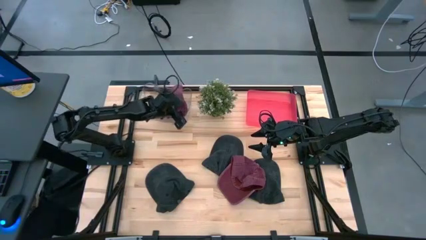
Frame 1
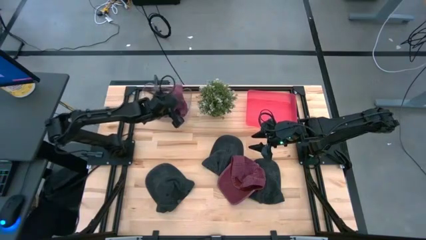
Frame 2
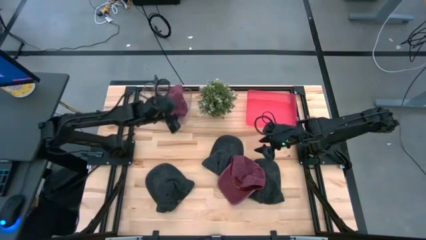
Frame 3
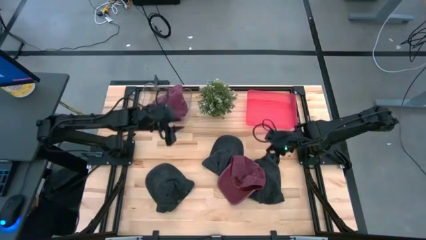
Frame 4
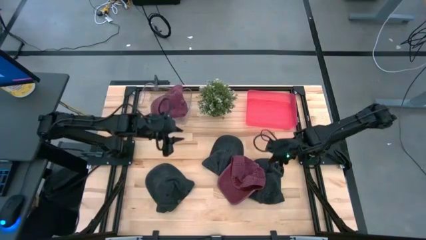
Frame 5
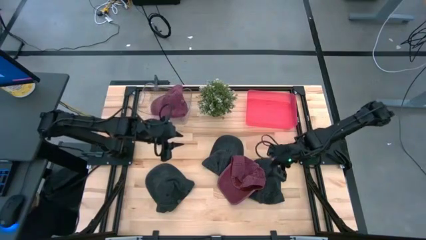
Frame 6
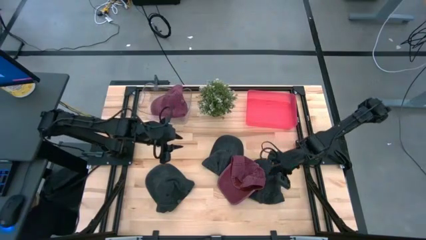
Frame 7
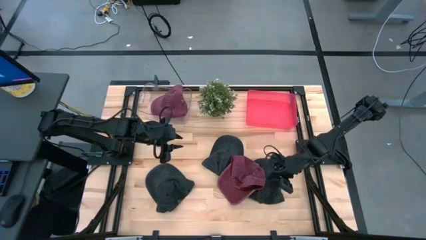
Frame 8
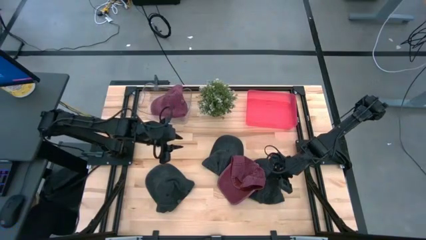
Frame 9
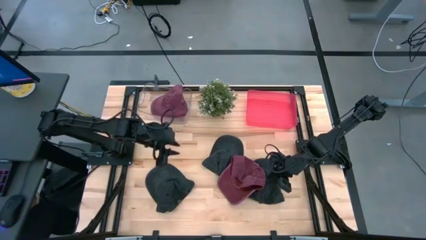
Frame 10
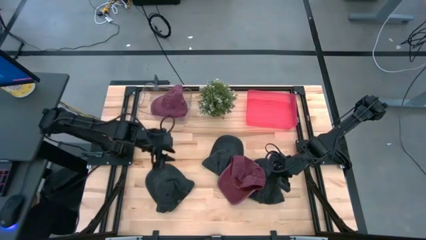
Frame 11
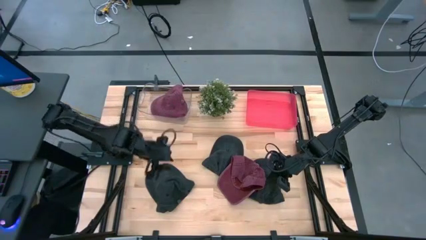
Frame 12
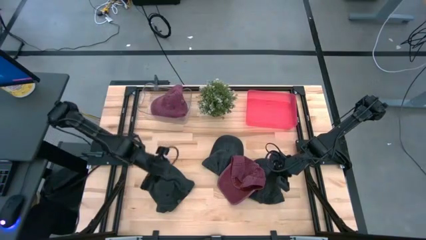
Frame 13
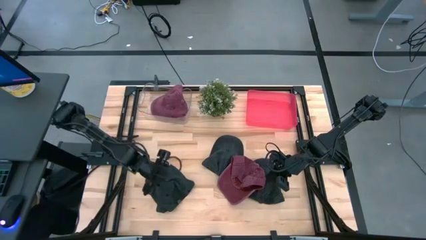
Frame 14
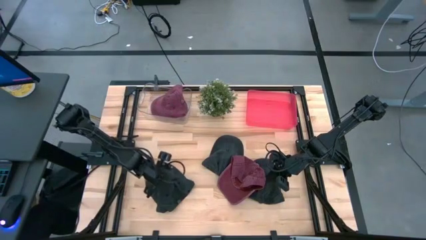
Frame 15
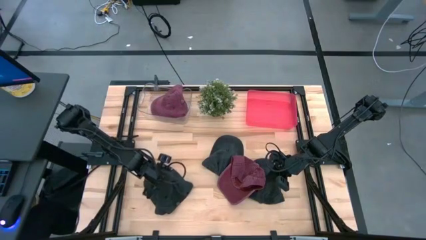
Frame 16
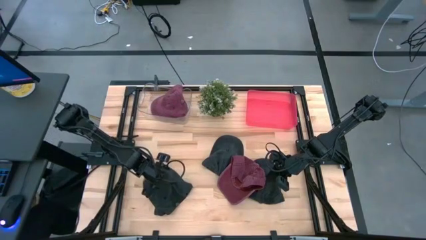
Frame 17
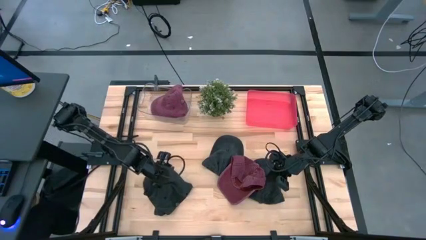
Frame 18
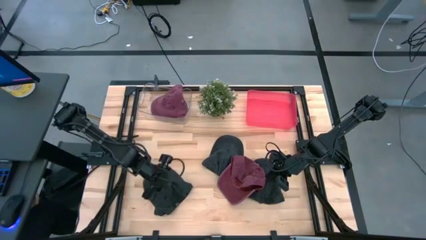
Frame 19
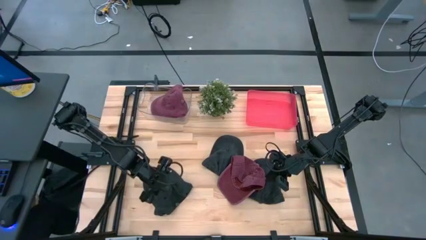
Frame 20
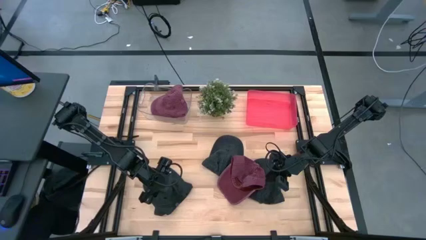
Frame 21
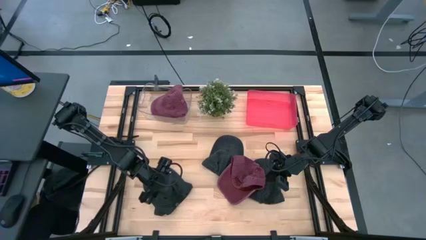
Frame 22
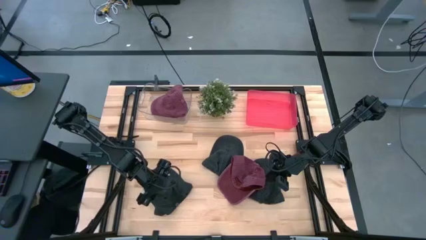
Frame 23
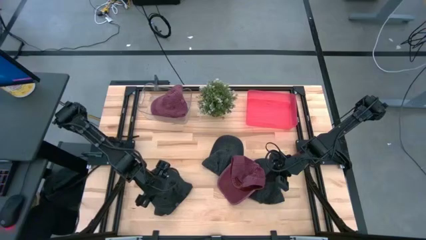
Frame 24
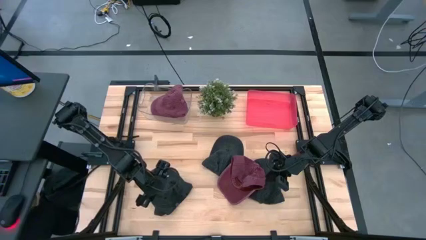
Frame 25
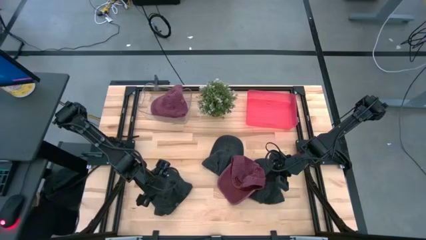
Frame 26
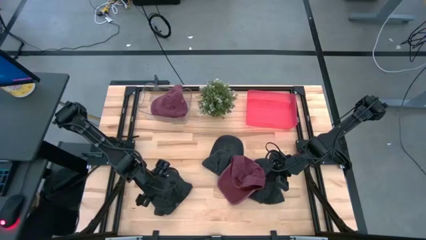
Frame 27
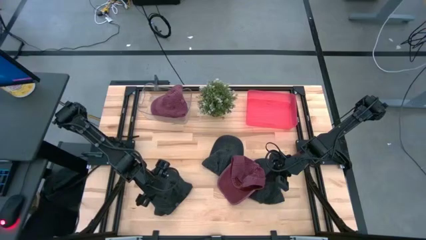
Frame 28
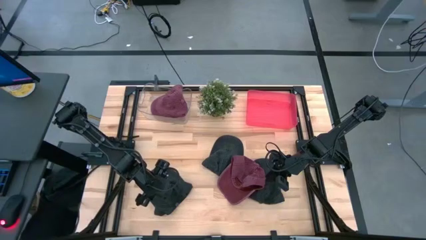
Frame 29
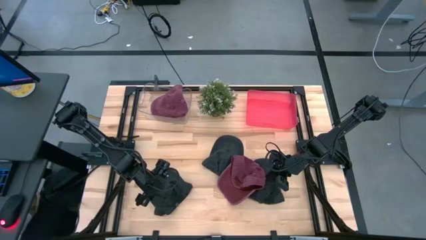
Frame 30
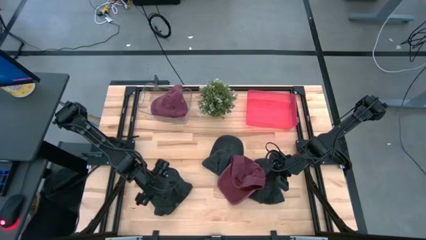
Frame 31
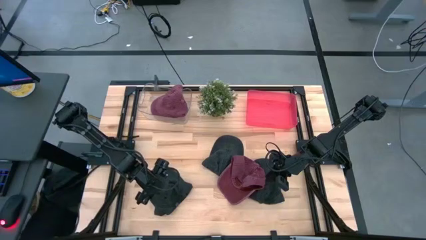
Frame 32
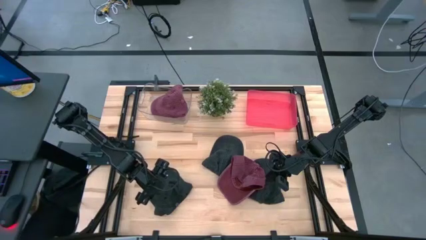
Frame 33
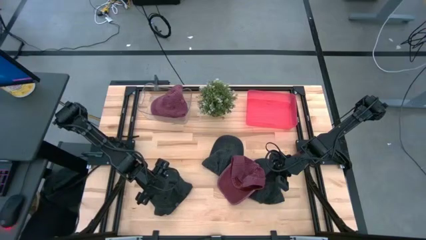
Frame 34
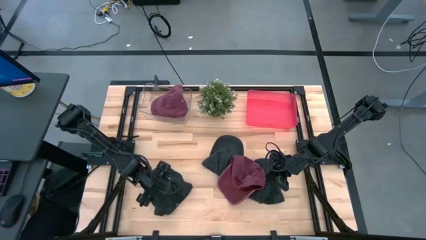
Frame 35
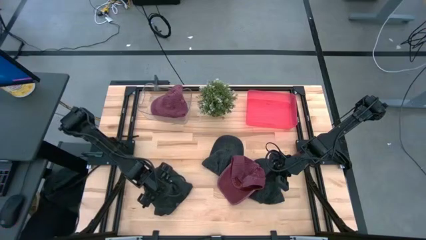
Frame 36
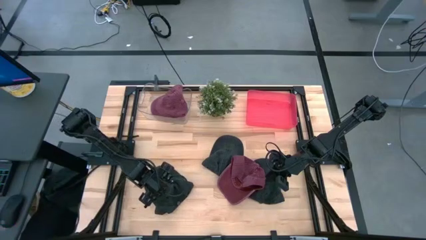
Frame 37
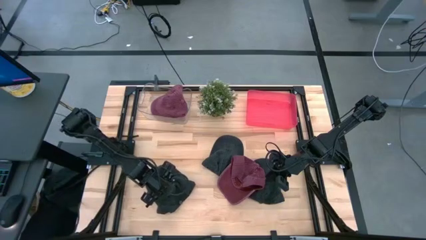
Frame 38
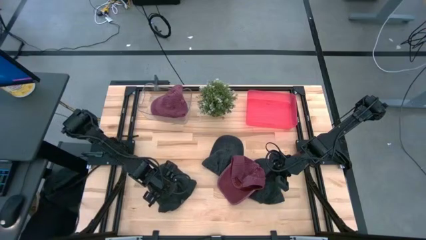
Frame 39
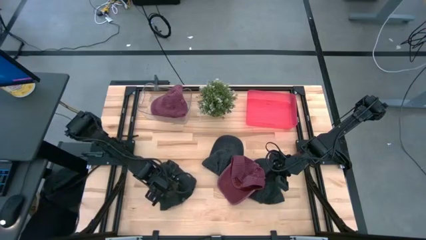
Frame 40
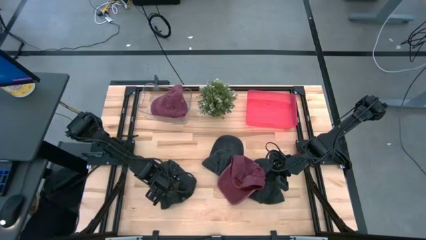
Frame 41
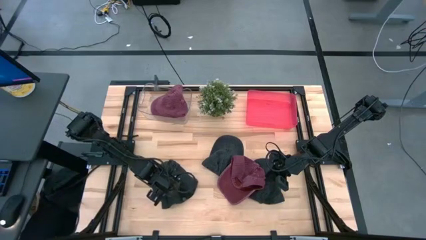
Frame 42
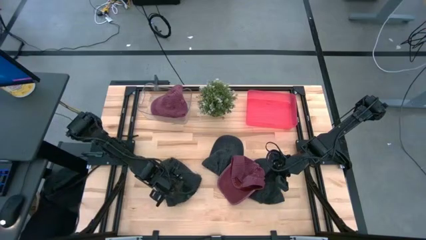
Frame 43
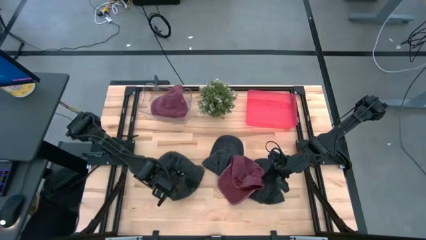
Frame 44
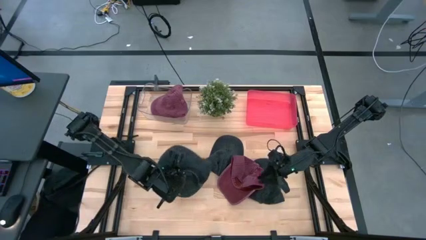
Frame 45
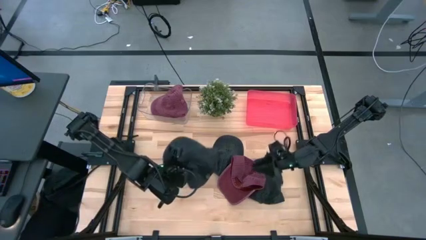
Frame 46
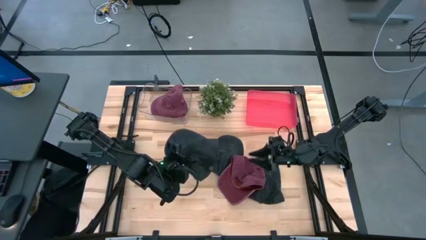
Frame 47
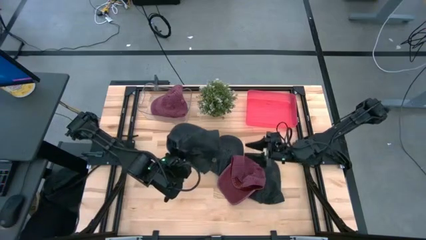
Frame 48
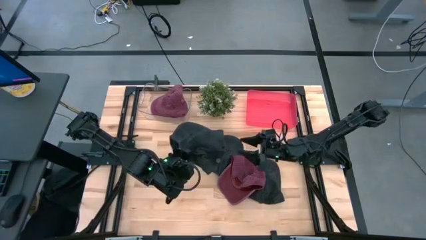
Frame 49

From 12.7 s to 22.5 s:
Task: Pick & Place hat
Put the left black cap into the pink bin

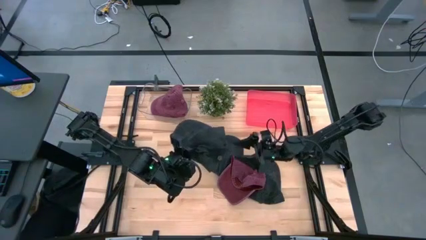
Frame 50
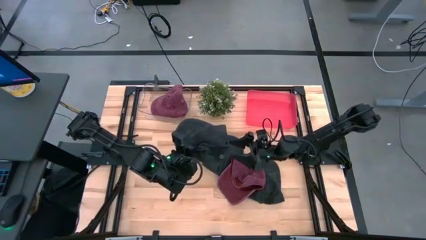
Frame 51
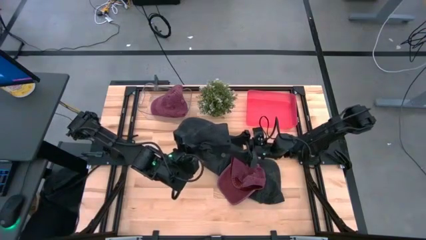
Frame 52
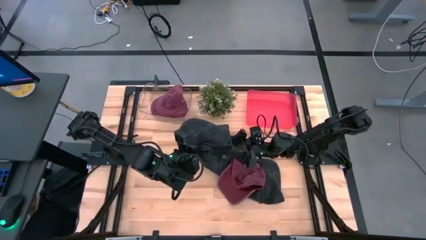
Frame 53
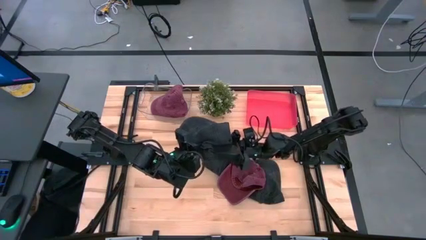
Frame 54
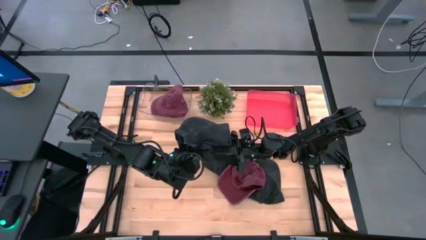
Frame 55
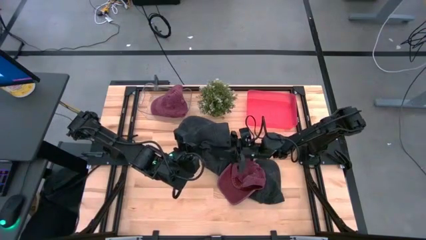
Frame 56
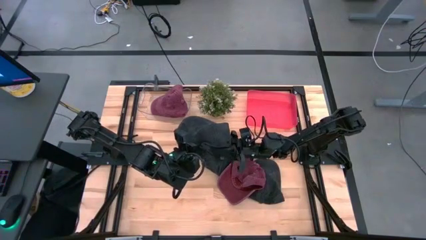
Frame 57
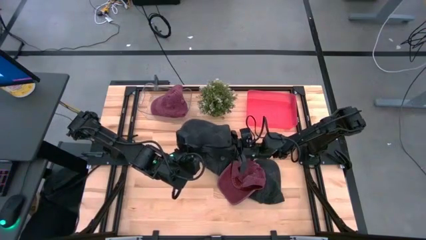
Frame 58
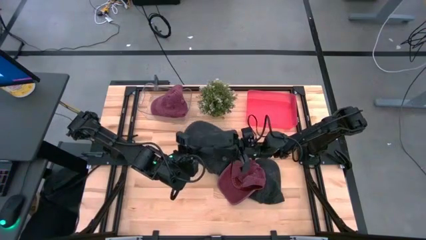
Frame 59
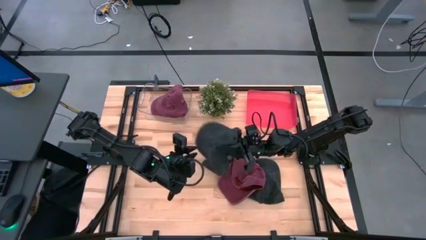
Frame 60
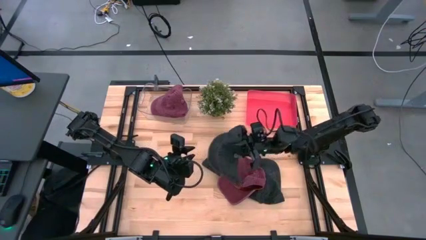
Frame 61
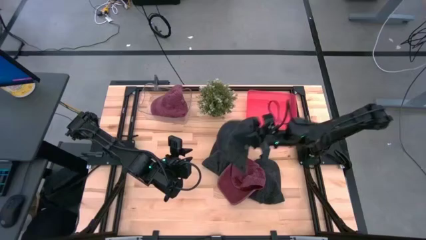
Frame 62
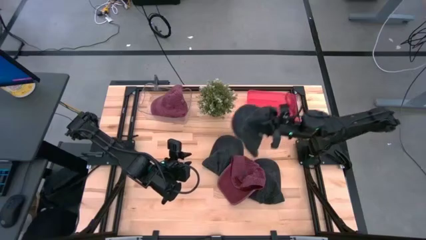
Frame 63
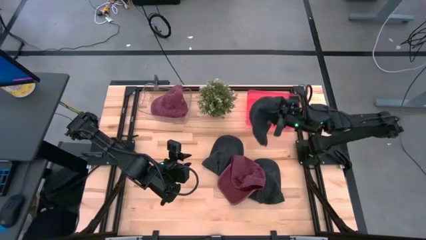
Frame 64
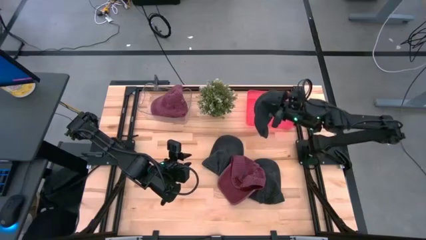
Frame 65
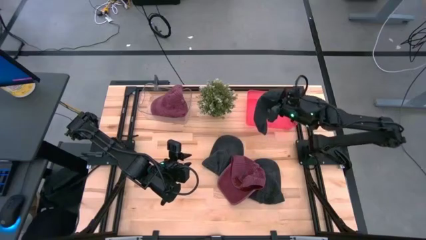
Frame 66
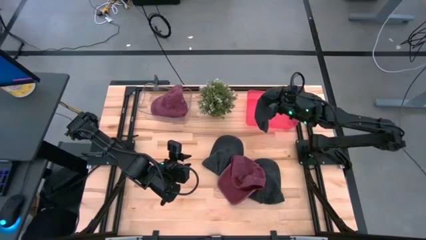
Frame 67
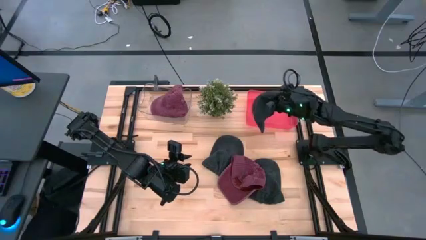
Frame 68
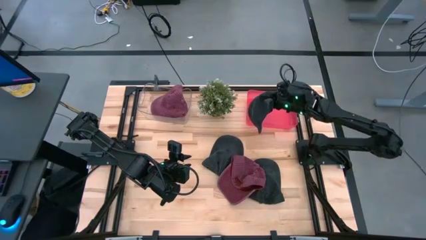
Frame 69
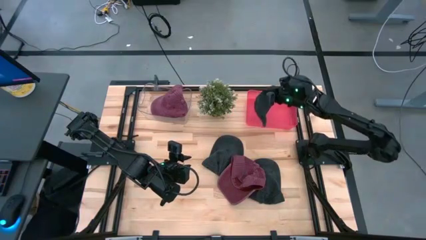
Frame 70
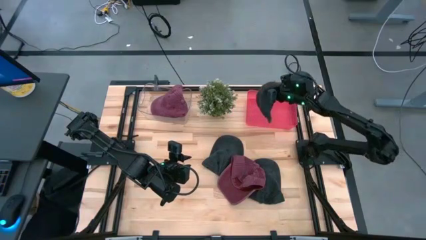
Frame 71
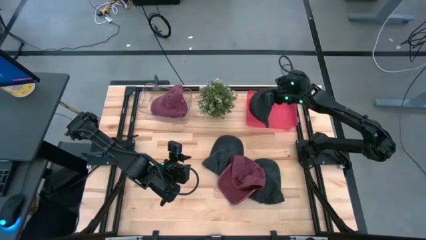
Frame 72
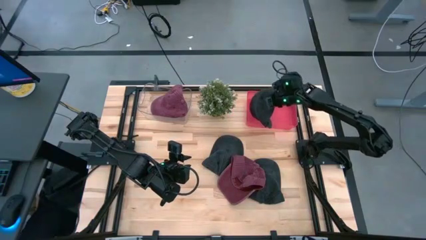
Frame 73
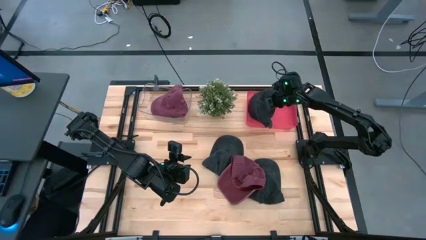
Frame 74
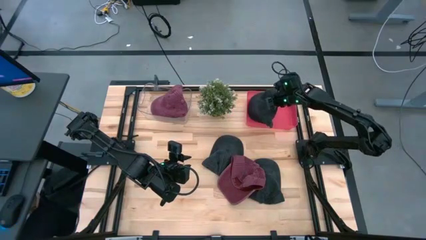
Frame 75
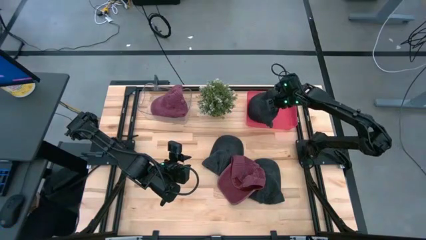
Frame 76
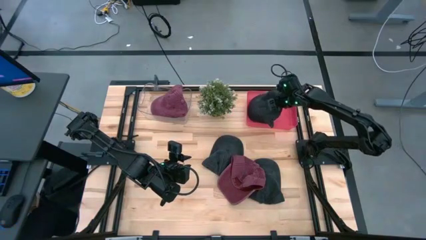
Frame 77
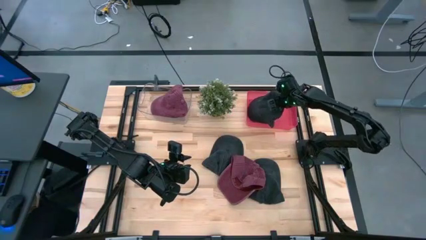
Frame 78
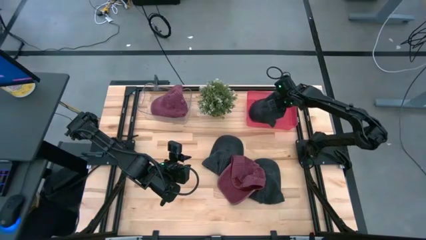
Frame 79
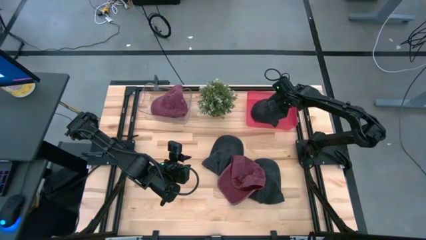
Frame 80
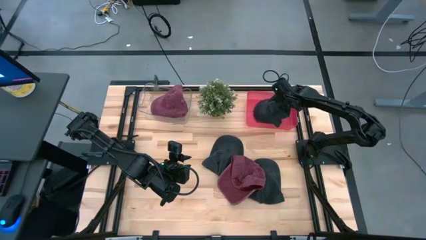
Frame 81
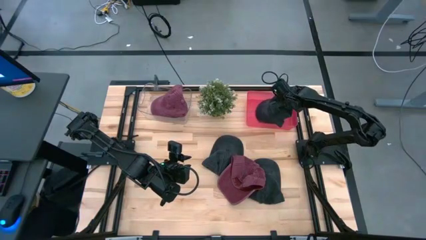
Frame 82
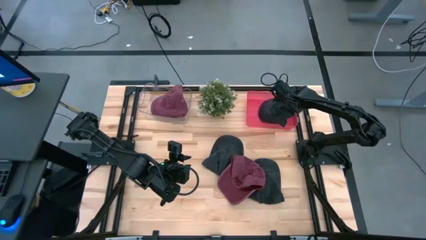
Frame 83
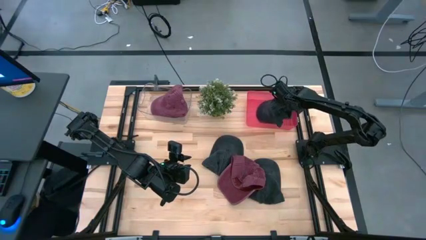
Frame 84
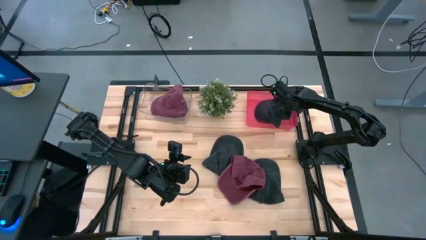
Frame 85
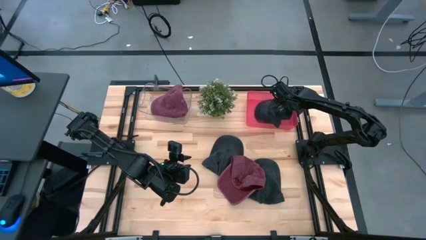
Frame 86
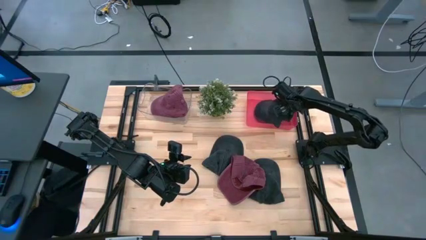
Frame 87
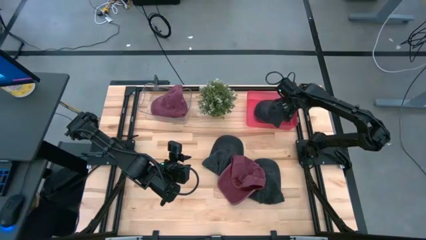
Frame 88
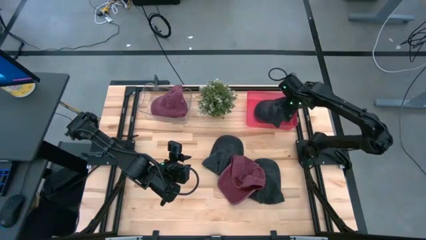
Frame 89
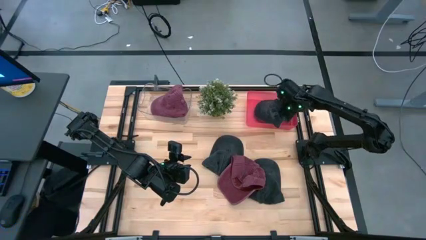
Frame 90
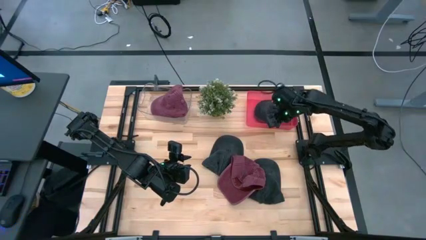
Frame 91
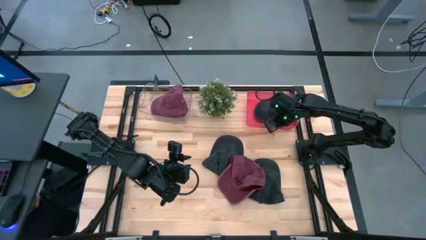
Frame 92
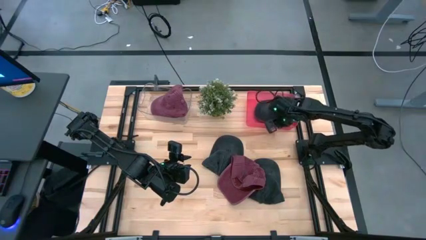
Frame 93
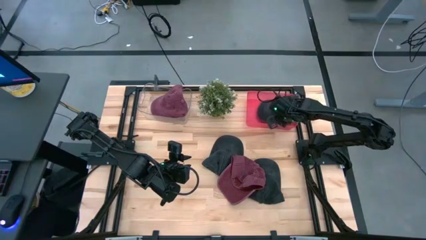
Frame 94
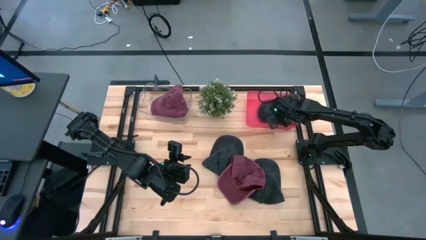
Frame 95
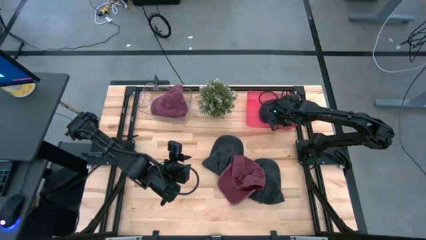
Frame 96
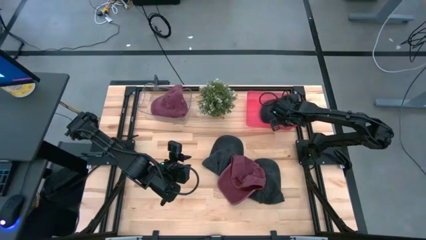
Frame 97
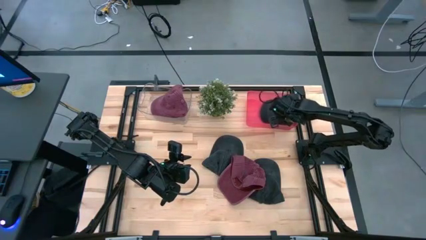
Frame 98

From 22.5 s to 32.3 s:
Put the left black cap into the pink bin
